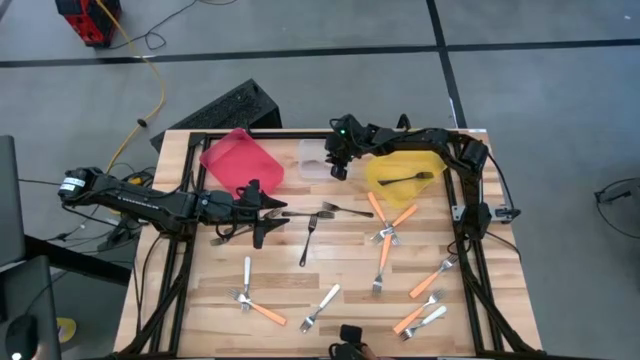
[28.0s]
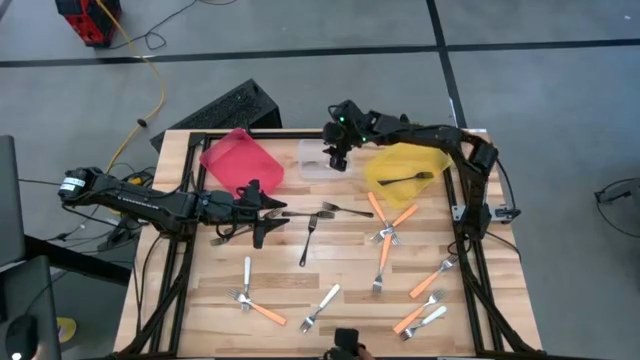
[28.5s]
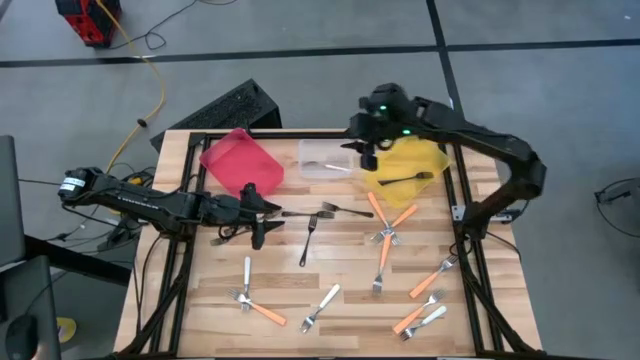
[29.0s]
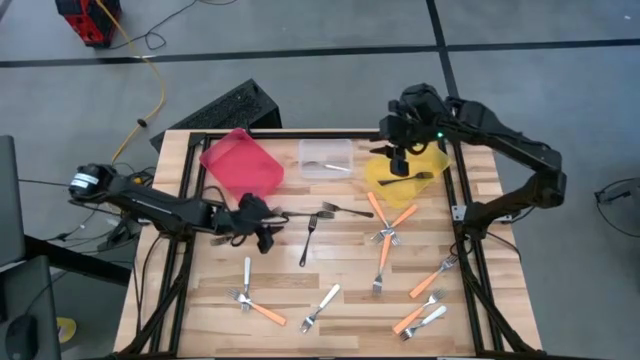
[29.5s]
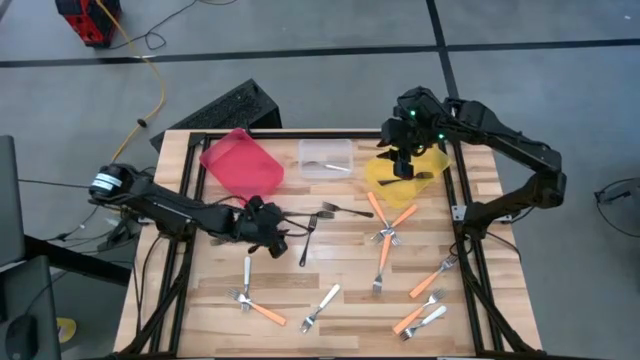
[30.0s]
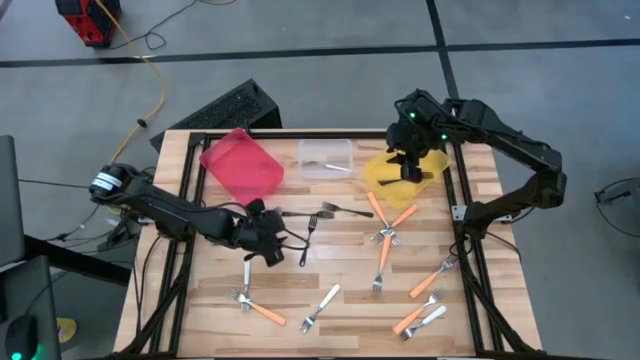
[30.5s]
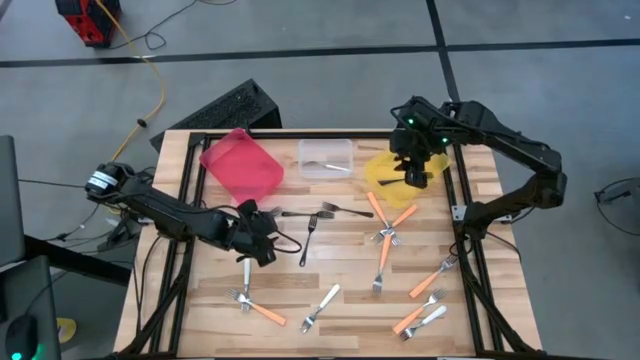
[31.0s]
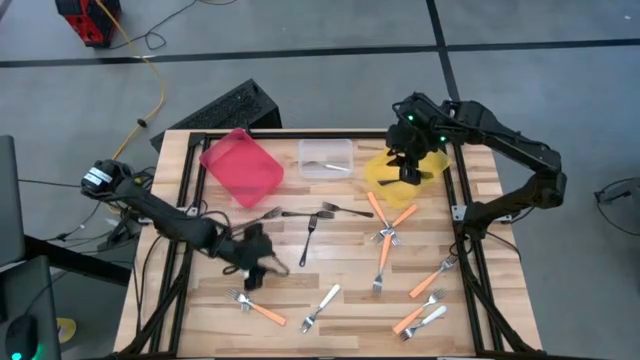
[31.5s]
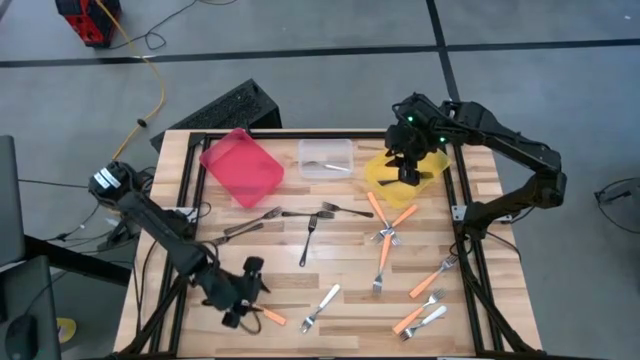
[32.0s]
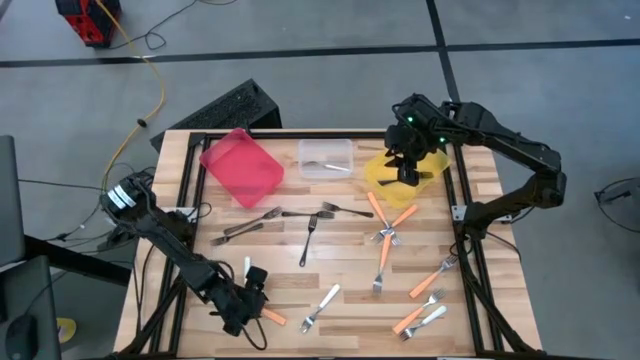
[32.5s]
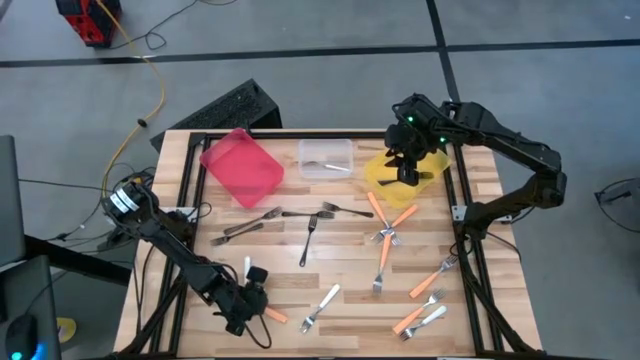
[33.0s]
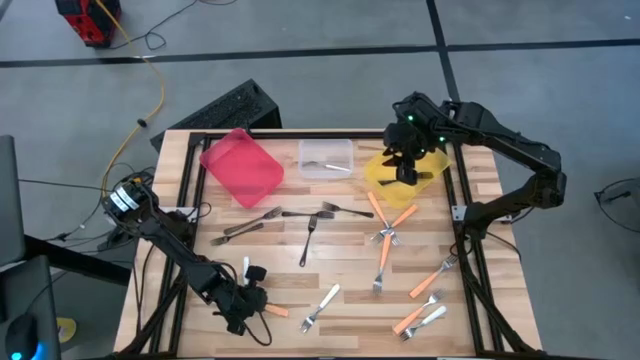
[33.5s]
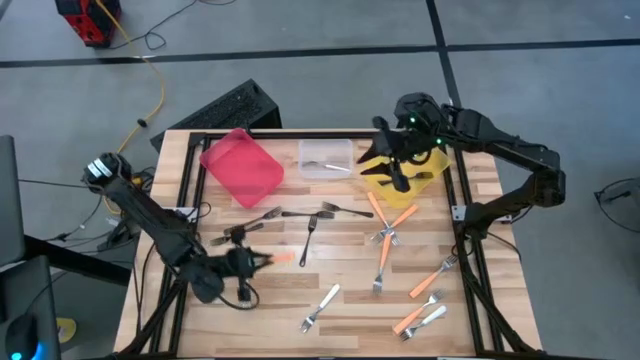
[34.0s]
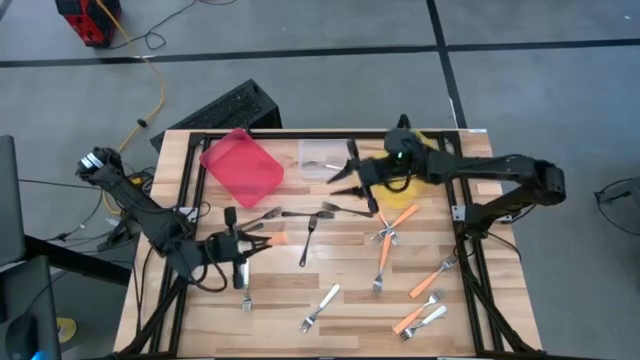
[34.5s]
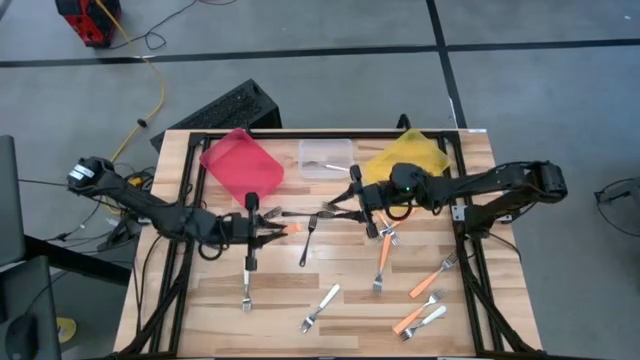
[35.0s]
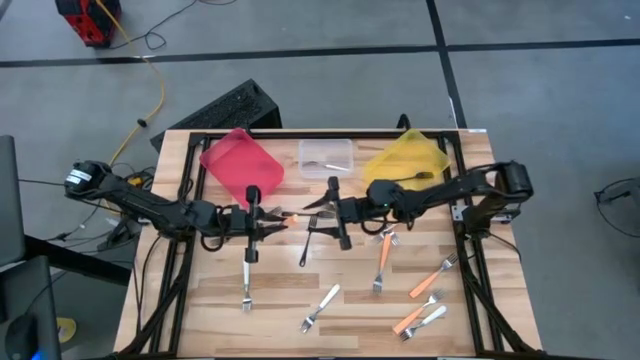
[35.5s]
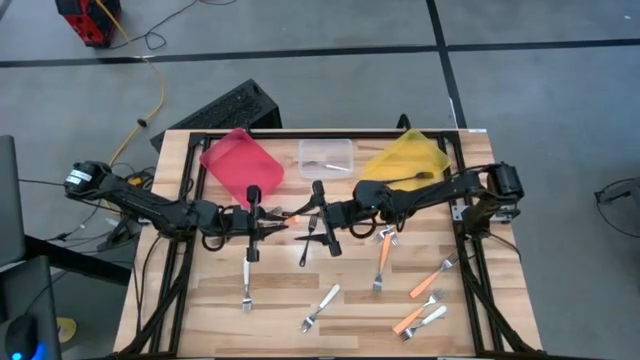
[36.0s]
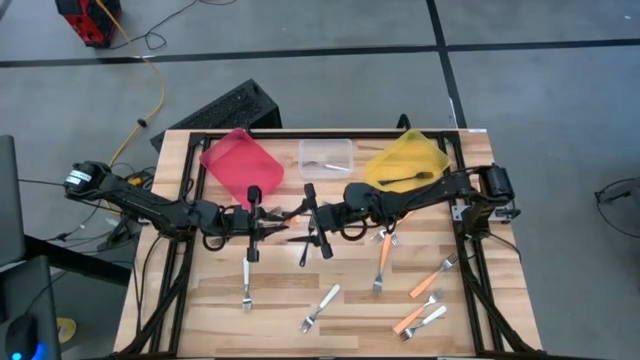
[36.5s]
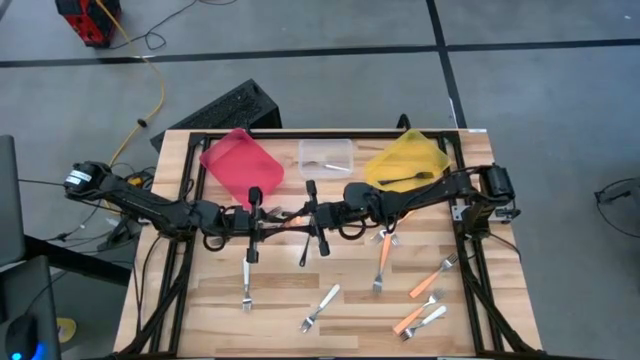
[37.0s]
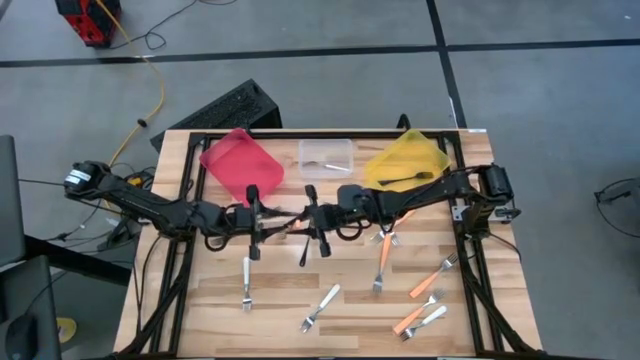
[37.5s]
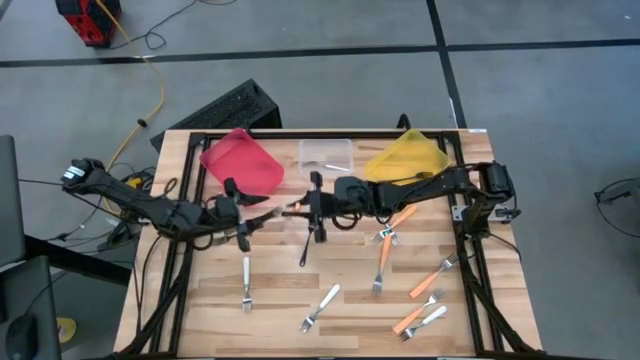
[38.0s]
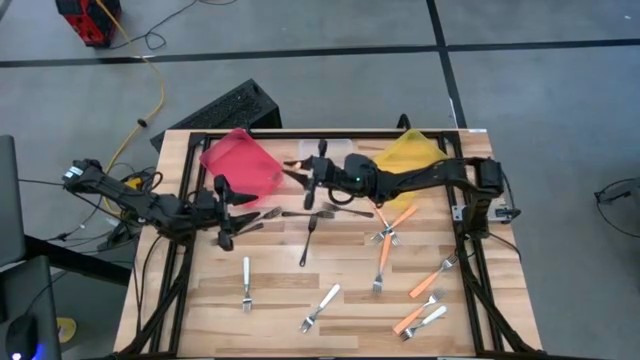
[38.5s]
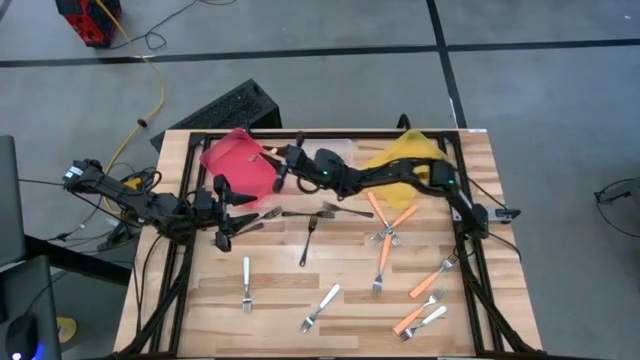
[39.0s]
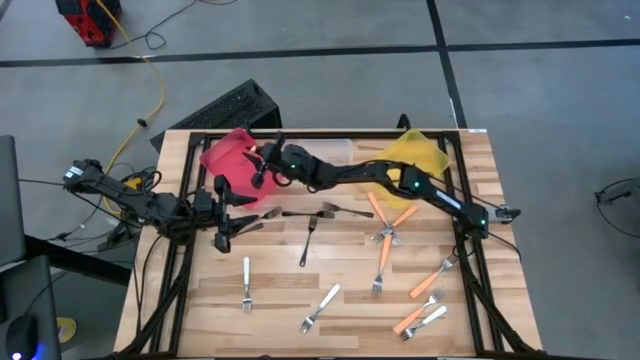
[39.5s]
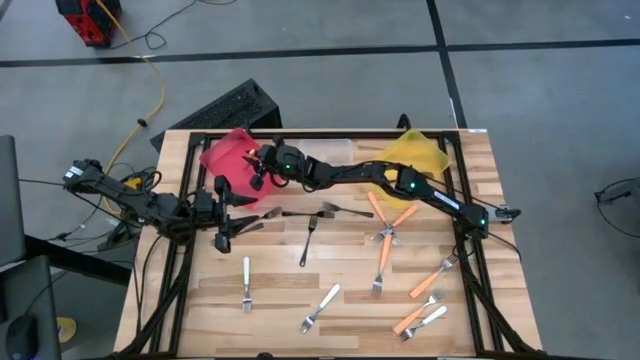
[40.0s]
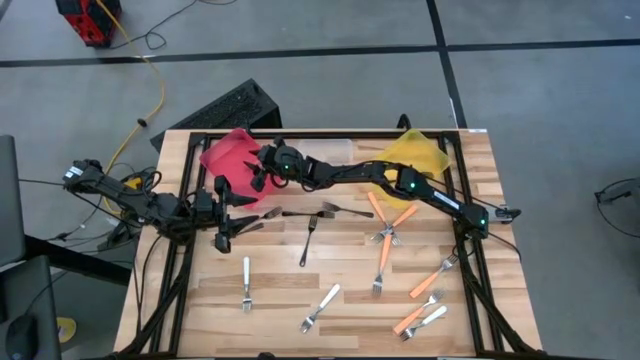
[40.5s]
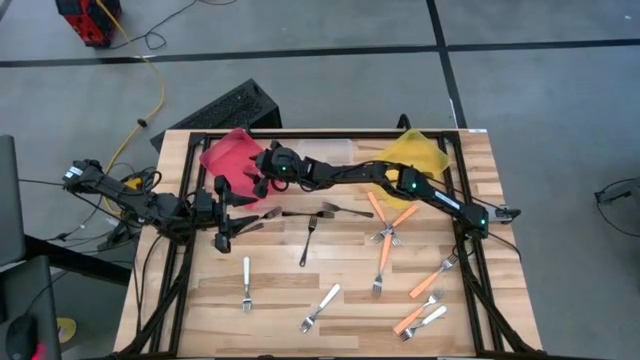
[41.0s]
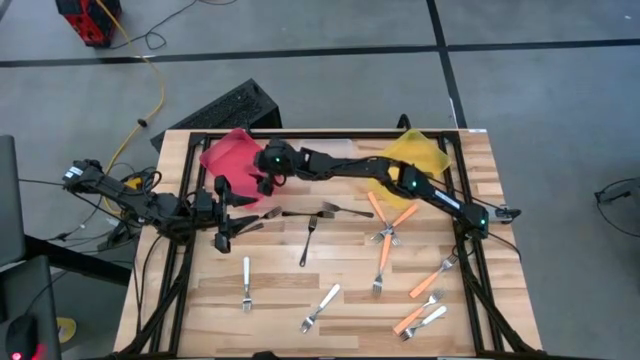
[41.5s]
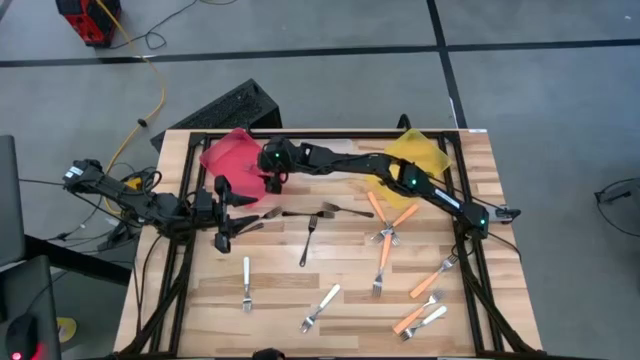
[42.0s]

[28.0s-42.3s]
Task: Sort silverware by color (type)
Put the orange fork into the red bin

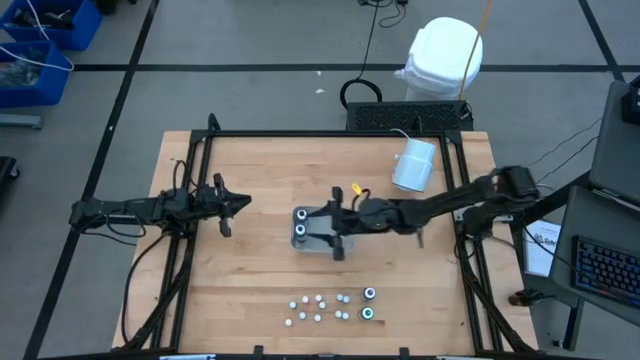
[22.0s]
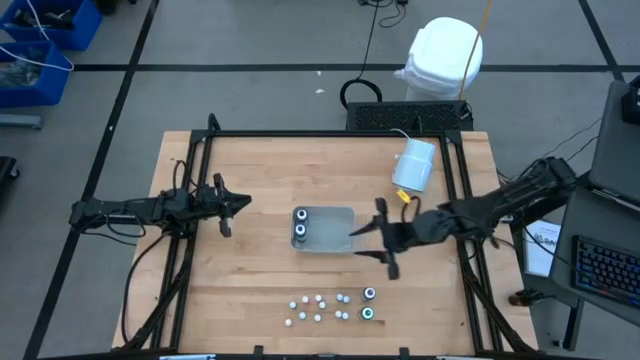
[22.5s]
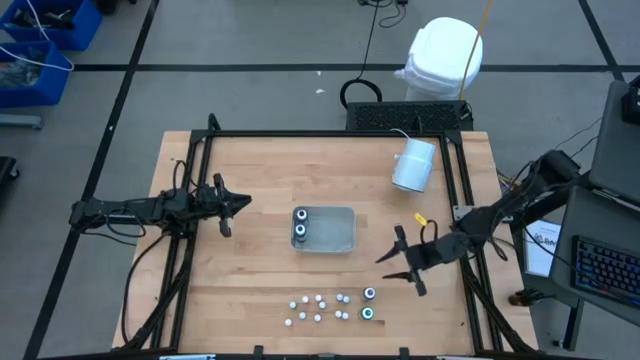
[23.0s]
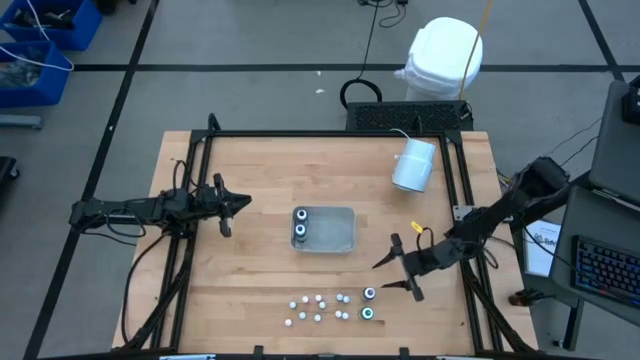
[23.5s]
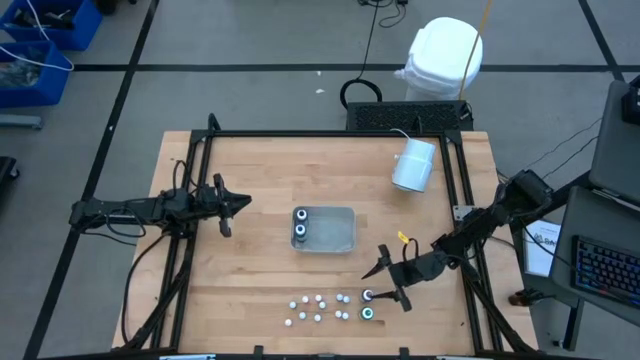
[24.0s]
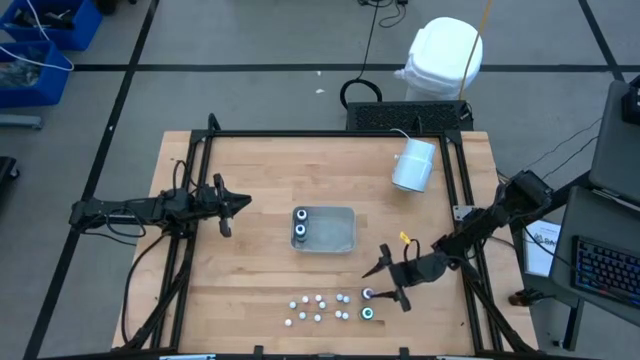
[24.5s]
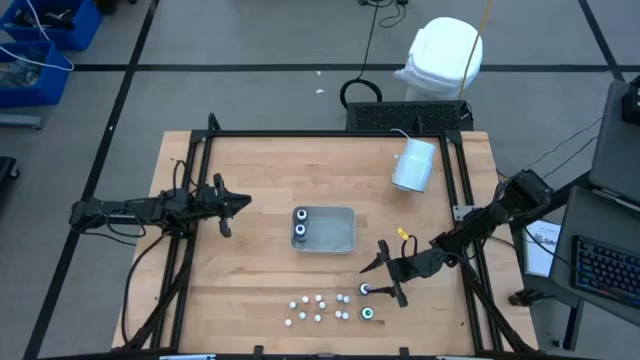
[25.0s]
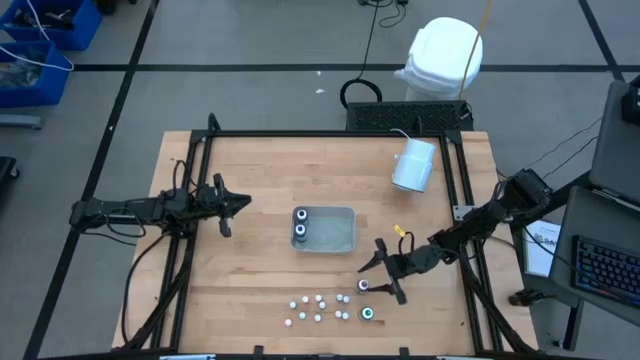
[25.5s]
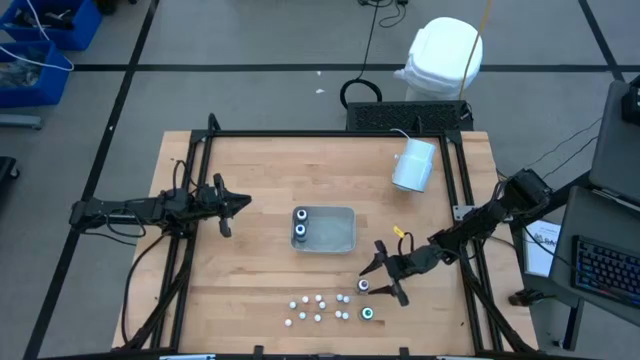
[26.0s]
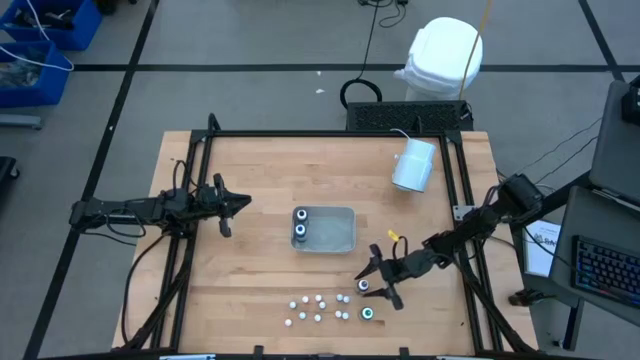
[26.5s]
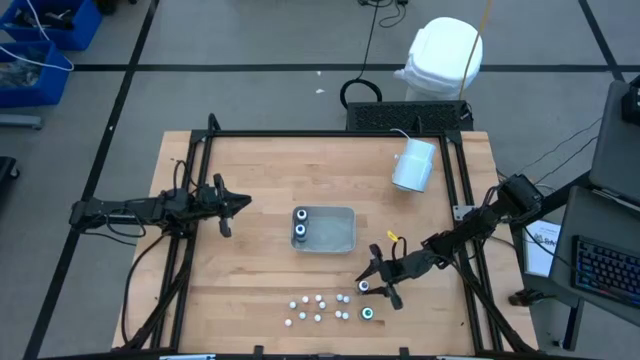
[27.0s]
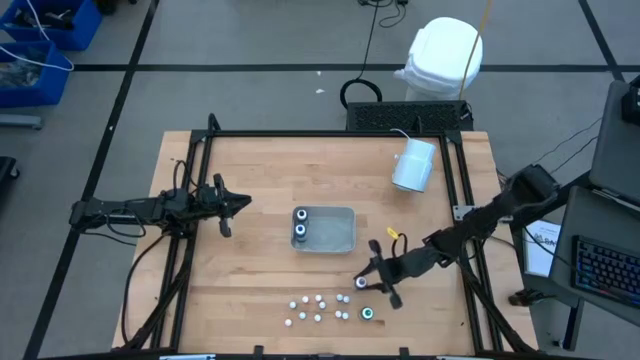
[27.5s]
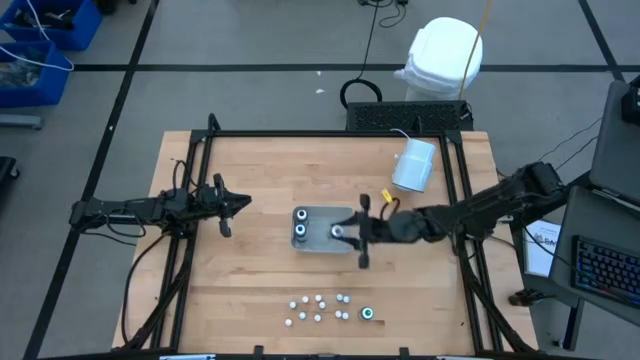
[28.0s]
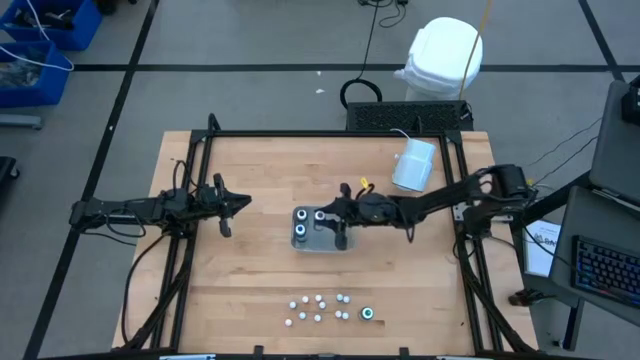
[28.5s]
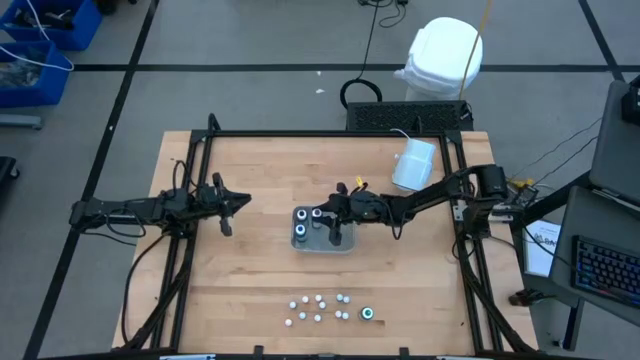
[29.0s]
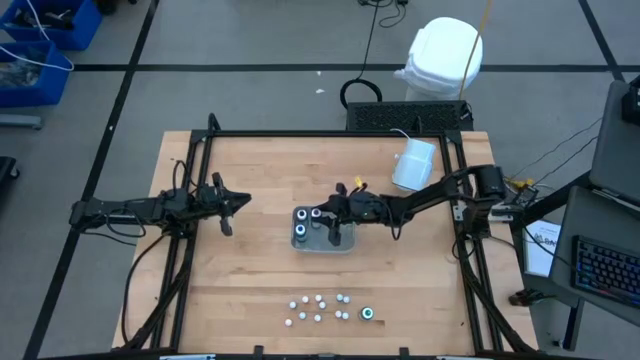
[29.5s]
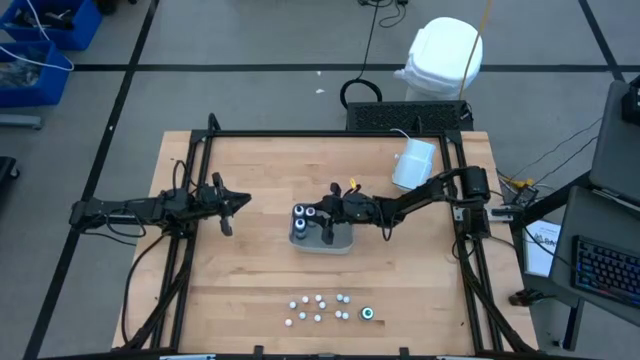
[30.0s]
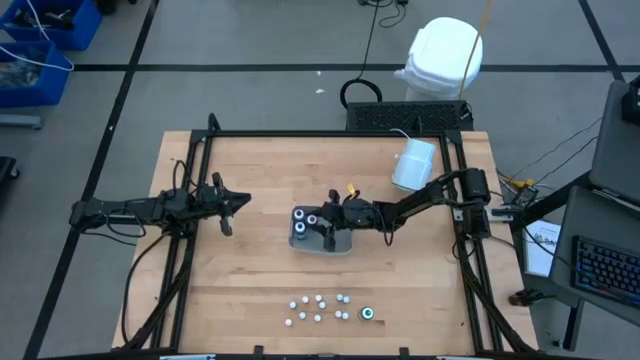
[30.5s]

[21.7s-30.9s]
Task: Pick & Place food coloring
Put the big purple bottle into the gray bin
